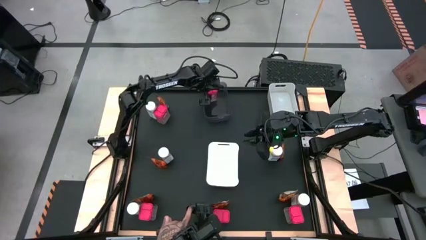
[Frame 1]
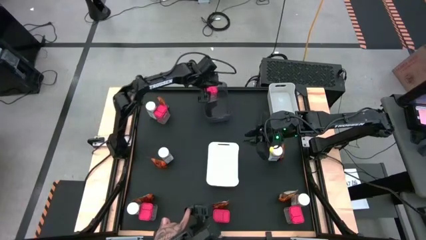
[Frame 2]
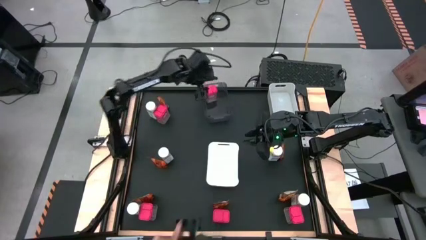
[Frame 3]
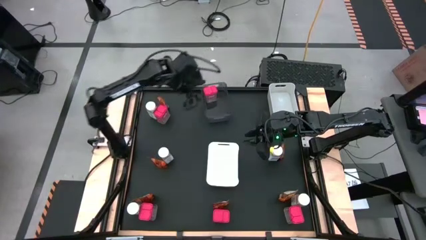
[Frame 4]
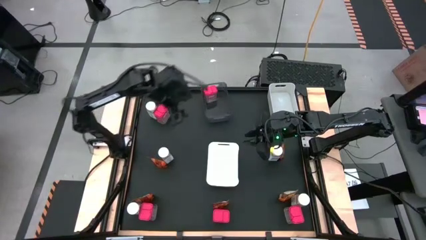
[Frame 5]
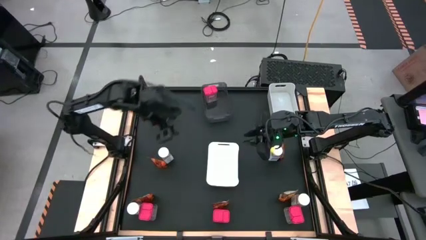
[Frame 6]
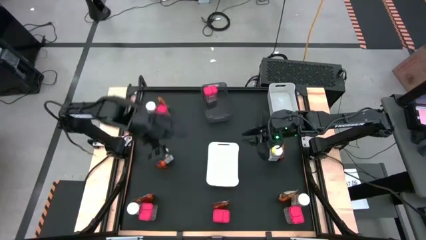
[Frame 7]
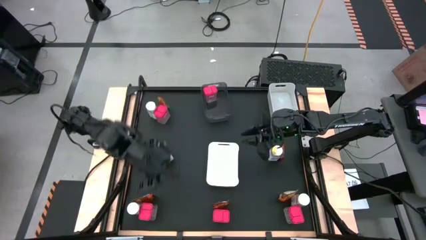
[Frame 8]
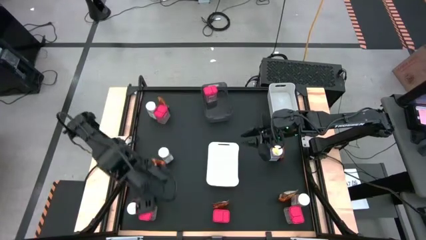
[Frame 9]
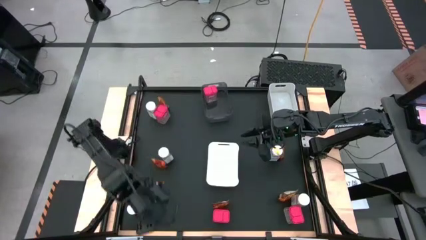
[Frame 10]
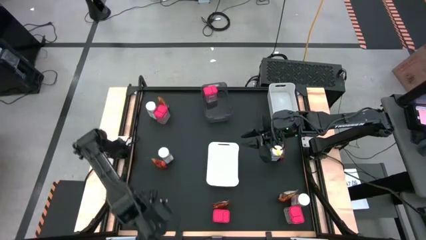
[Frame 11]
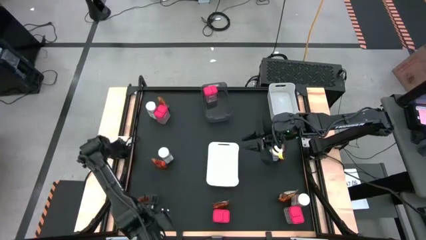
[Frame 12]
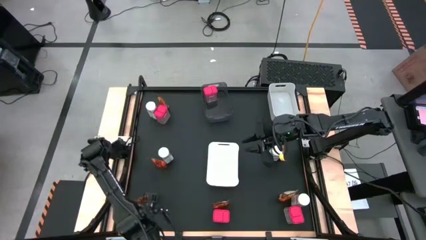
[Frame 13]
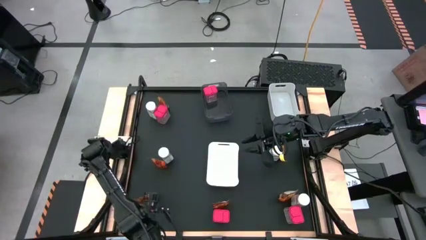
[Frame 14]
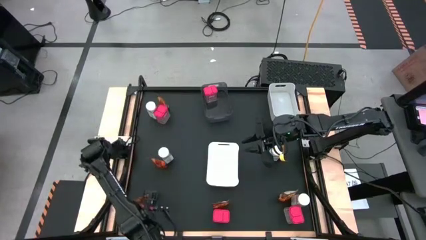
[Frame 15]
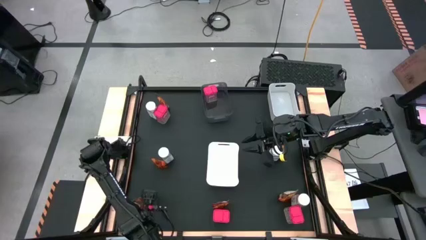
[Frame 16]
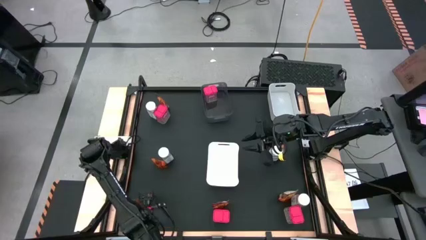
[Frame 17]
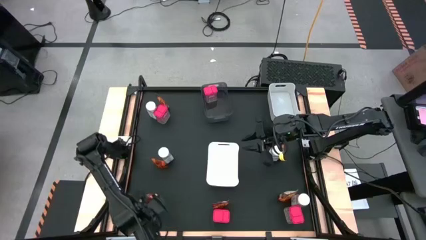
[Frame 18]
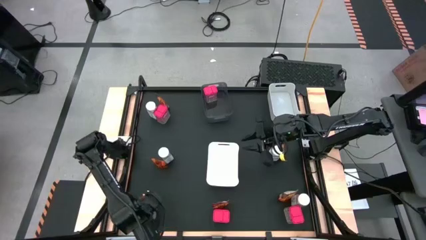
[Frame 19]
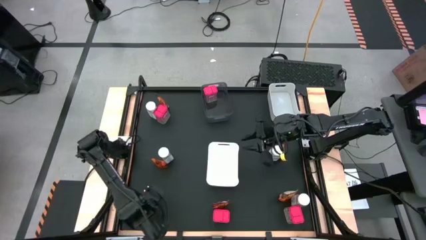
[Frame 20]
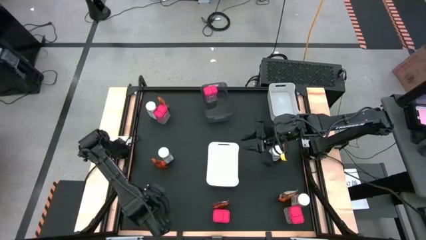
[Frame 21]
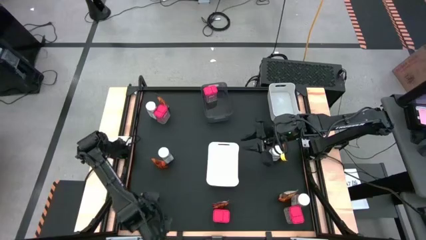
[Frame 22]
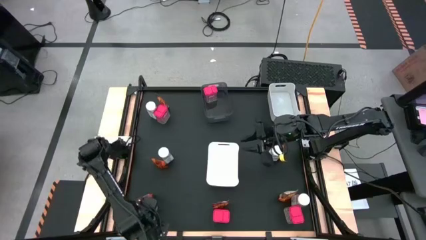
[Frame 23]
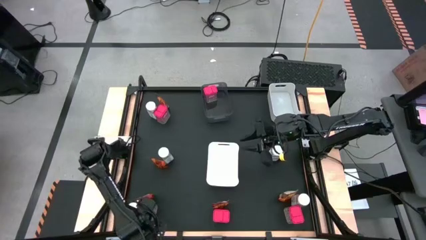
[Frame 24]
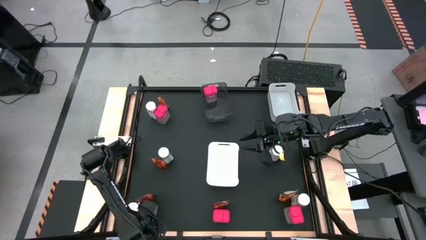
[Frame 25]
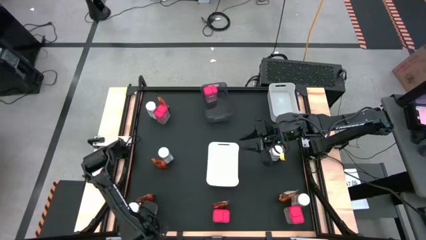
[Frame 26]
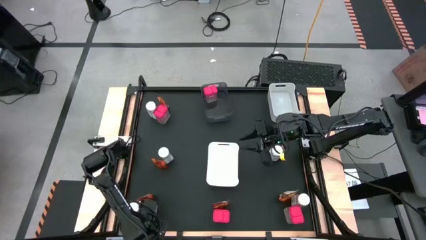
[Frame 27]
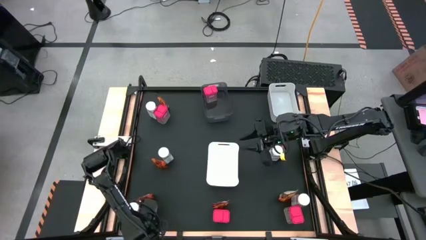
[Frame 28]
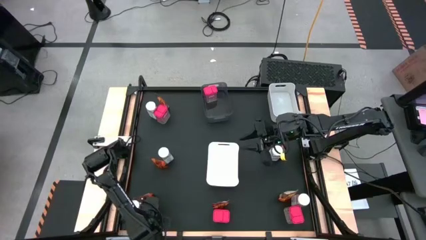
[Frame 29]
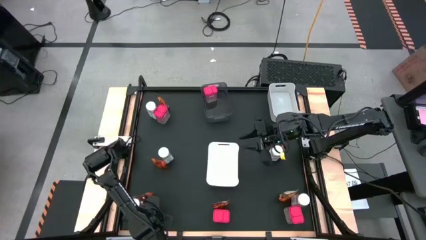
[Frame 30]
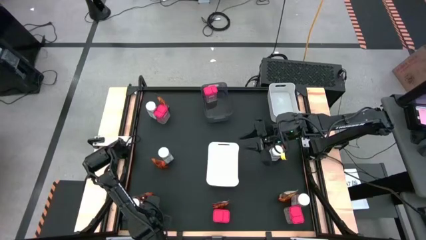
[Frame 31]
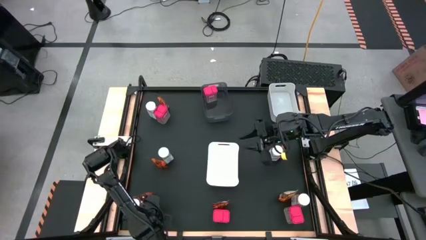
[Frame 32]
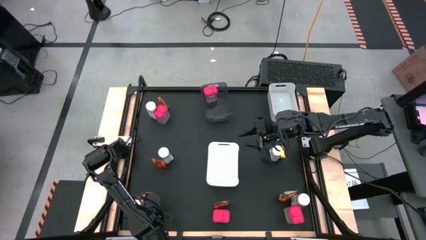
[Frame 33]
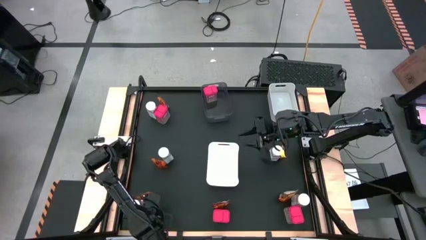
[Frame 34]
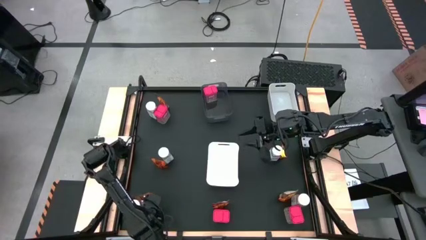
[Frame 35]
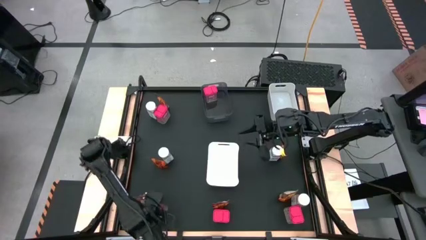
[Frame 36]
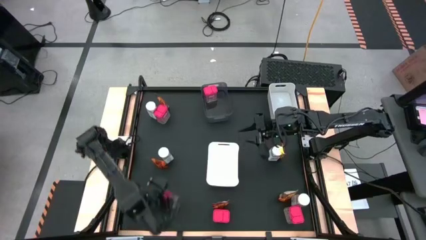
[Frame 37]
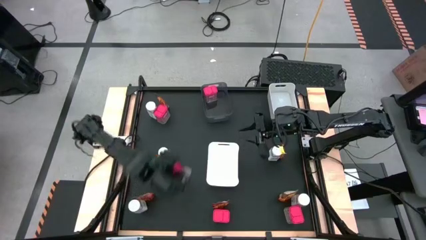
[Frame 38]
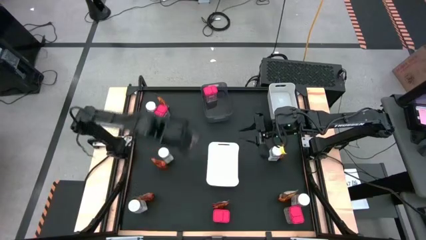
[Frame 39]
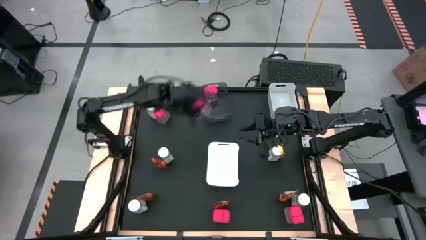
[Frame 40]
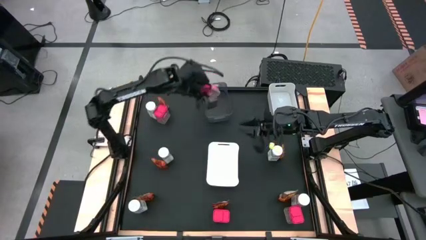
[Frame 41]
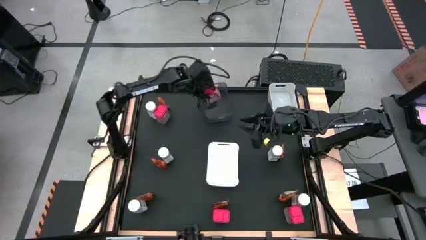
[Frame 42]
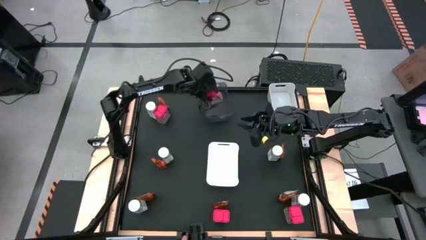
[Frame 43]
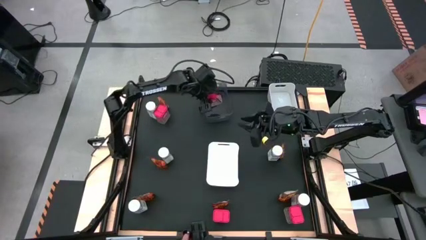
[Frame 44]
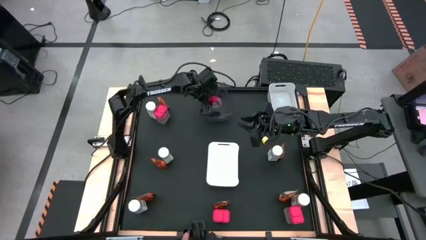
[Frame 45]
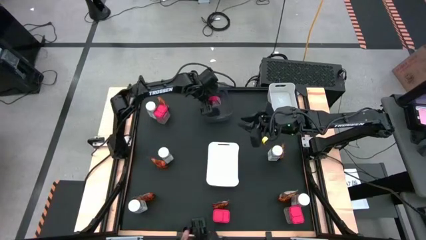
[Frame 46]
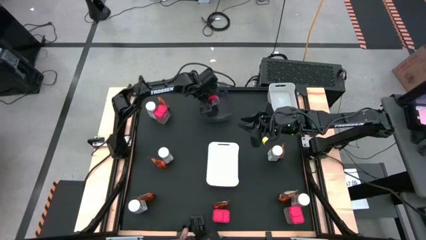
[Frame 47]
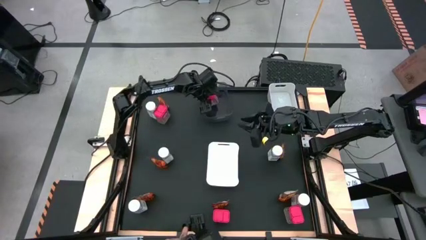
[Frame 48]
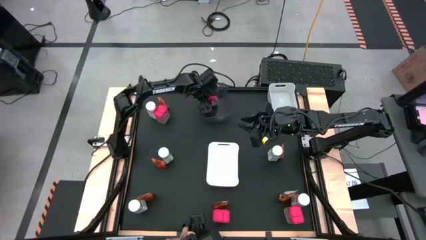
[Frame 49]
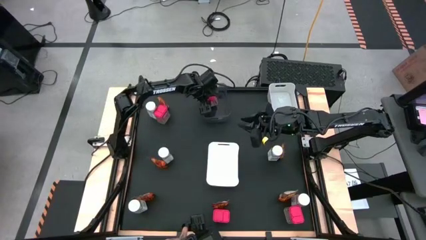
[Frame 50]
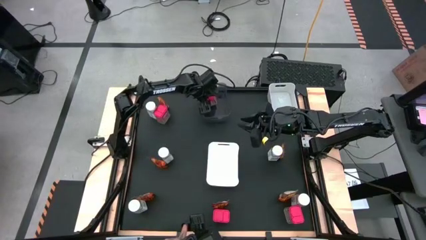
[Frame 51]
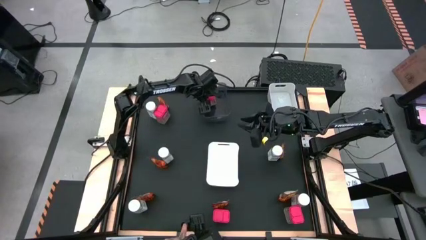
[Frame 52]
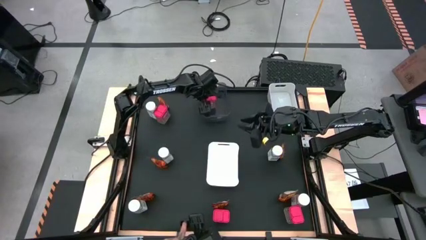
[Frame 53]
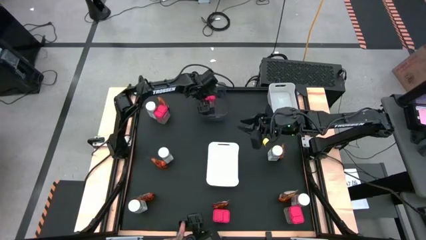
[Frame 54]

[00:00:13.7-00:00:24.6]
Task: Sort spices by type
Put the red seasoning can into the black bin

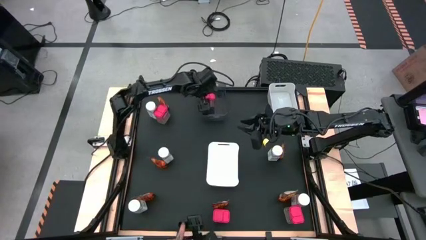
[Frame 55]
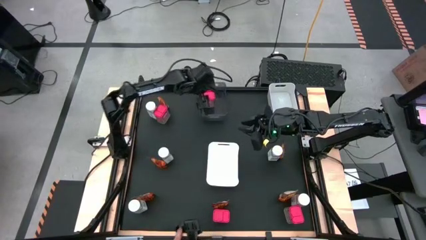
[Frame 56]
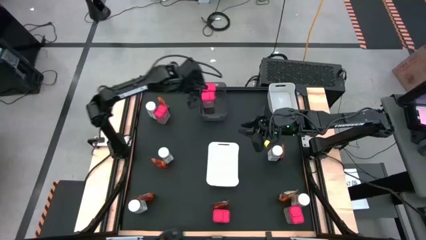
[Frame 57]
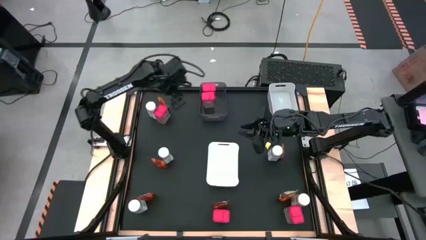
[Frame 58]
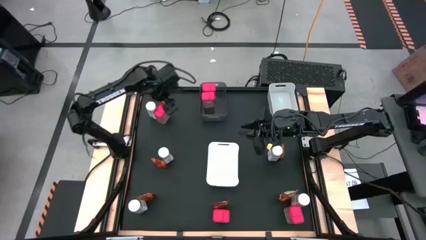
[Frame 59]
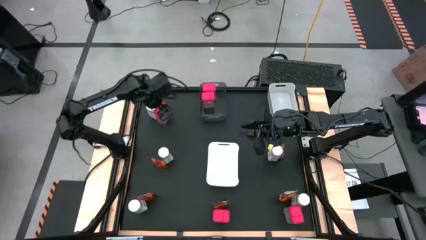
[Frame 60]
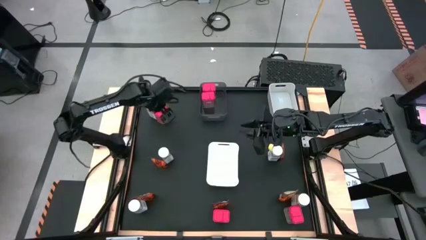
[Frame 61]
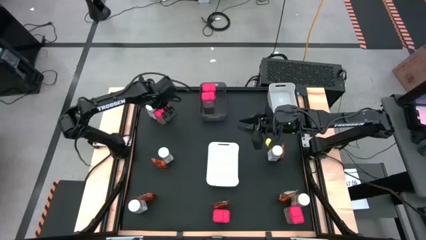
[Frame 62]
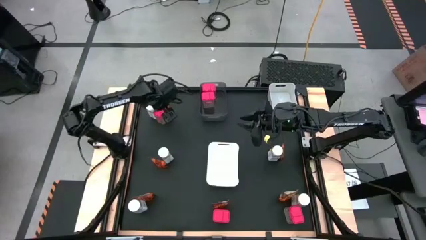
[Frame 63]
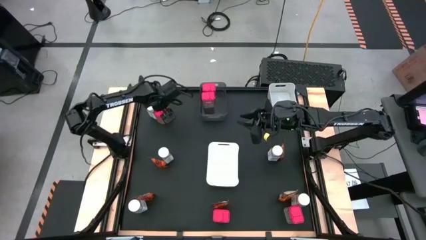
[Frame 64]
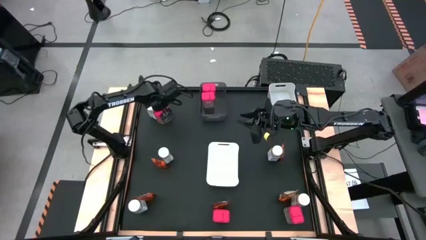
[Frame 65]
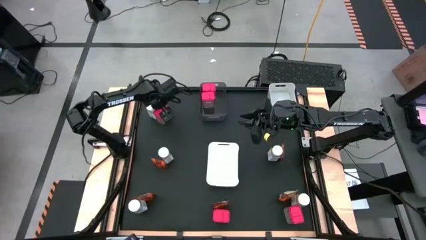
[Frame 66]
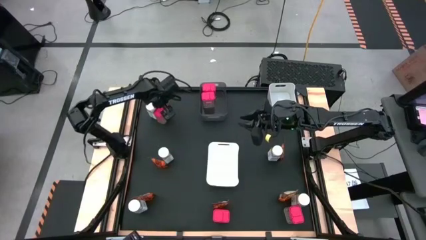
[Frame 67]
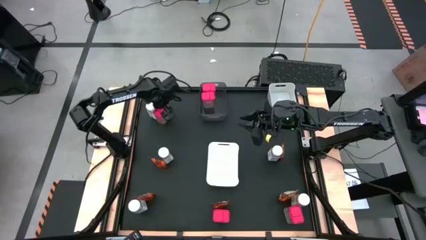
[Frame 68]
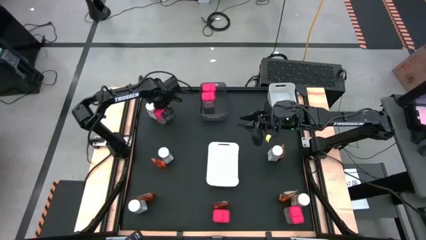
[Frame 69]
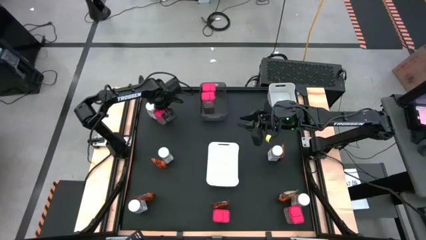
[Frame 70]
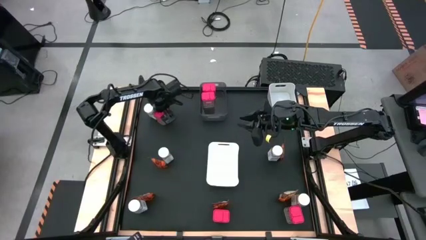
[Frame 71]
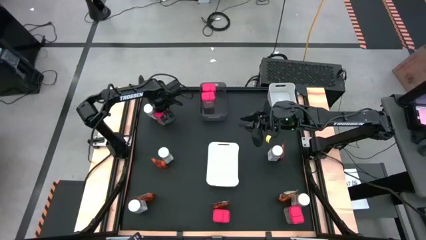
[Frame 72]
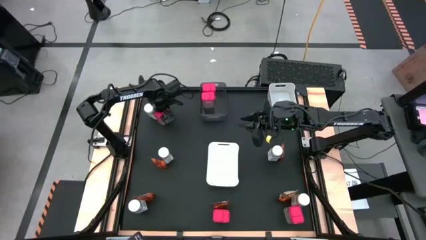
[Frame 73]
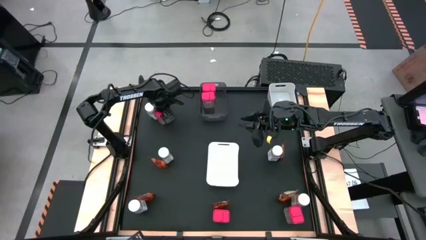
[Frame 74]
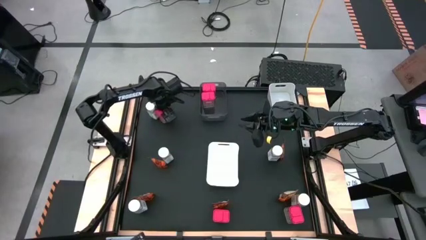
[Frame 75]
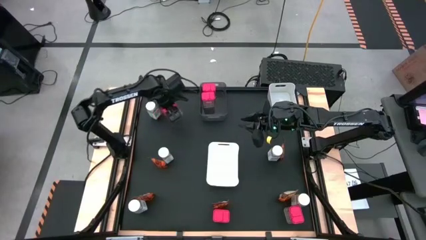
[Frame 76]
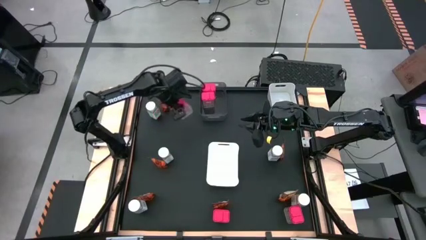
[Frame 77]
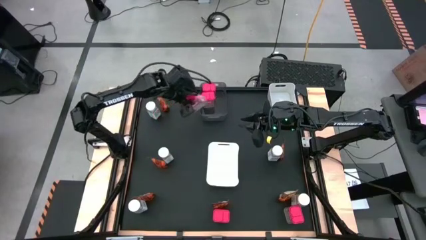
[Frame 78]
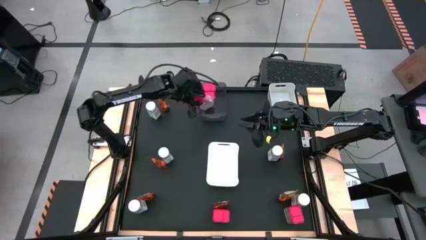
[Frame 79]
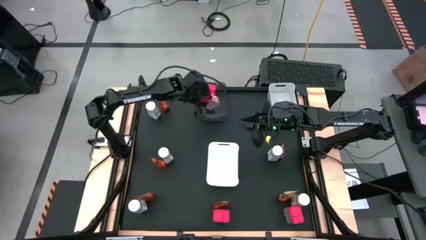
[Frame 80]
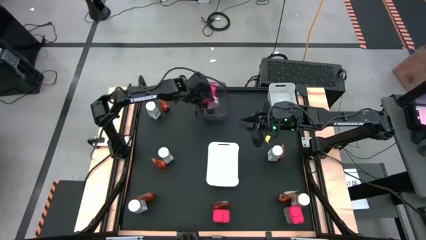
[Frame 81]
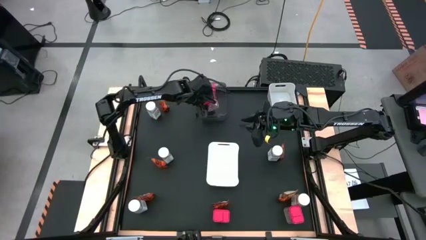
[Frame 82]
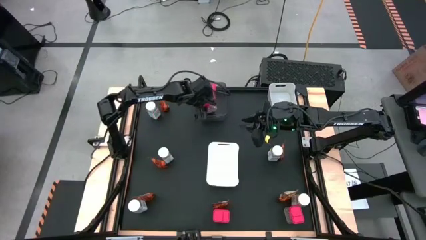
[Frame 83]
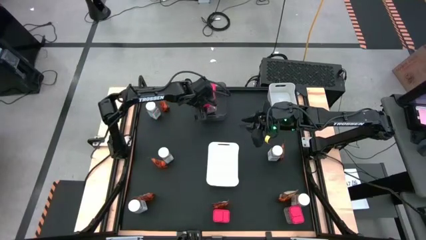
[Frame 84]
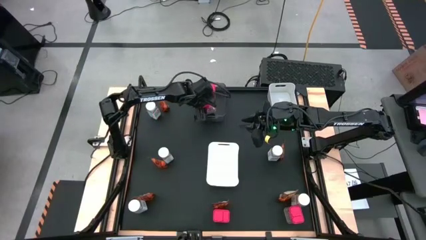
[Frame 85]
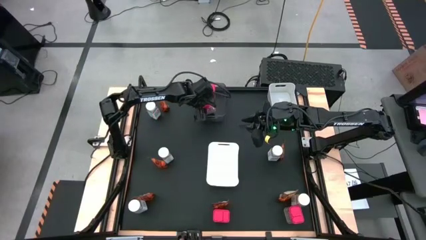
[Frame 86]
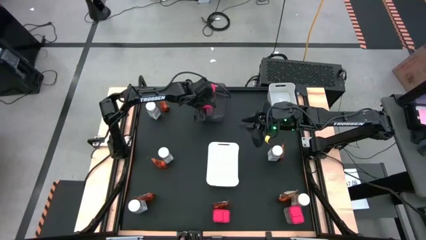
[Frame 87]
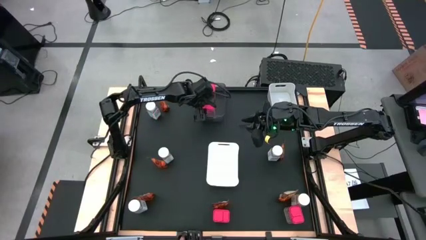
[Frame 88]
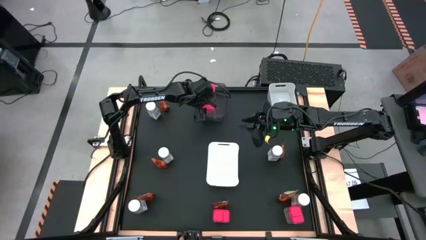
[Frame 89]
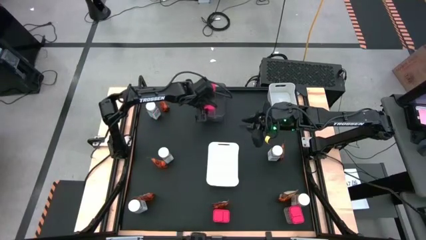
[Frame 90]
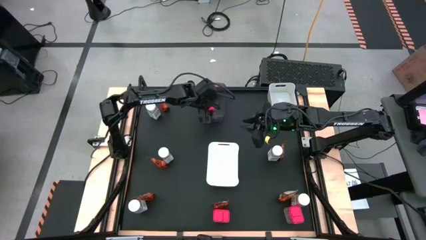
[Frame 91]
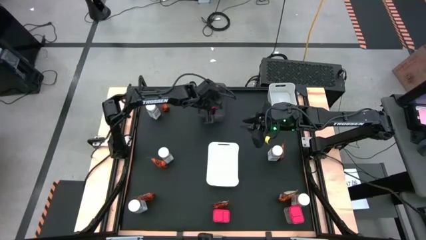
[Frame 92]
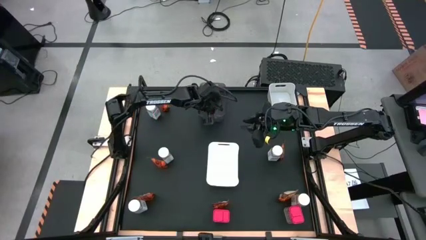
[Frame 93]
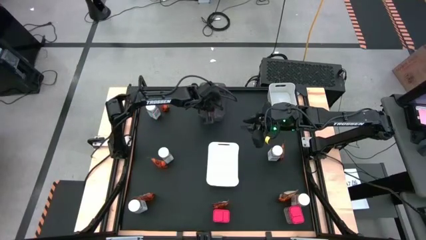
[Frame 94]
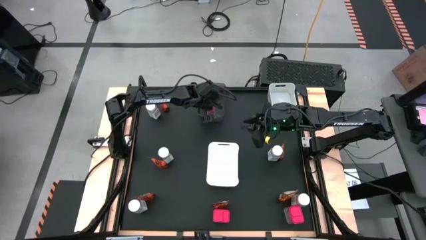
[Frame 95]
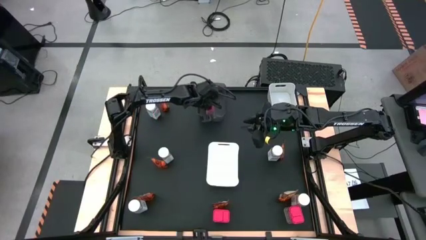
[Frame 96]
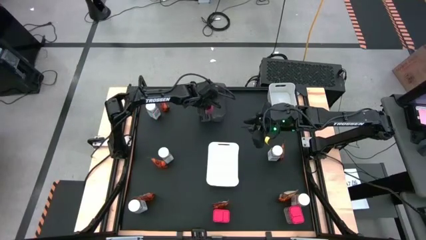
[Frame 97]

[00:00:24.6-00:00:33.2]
Put the red seasoning can into the black bin
